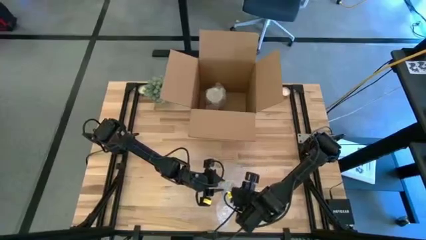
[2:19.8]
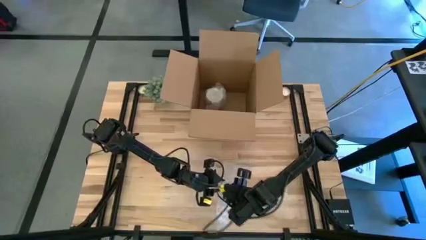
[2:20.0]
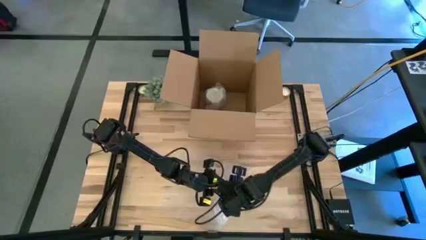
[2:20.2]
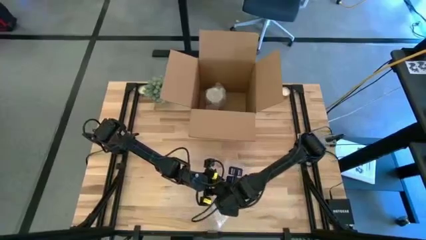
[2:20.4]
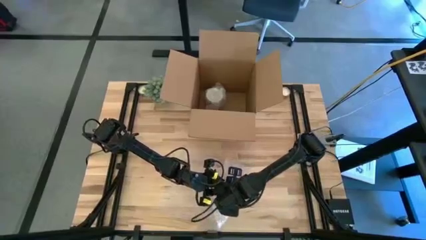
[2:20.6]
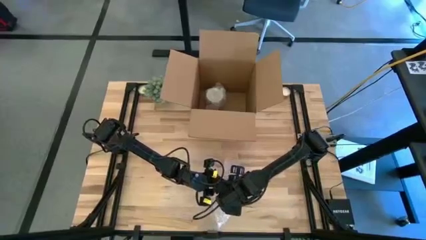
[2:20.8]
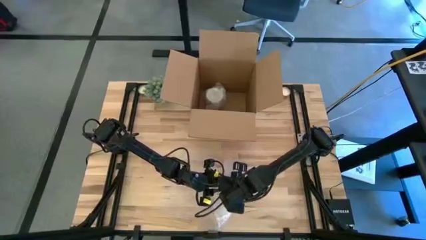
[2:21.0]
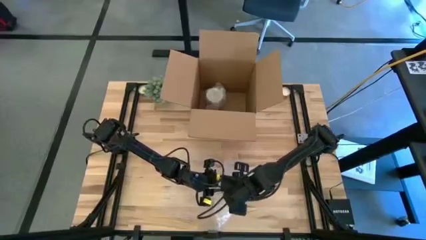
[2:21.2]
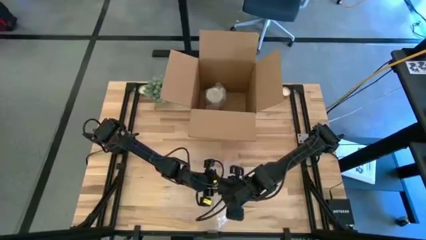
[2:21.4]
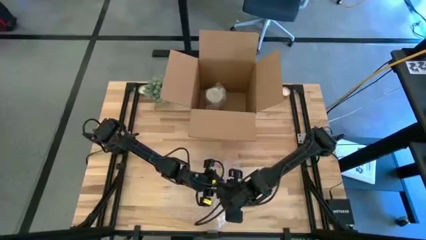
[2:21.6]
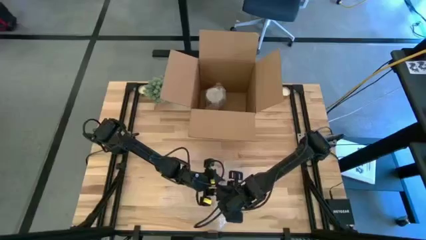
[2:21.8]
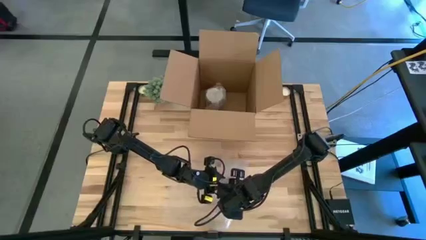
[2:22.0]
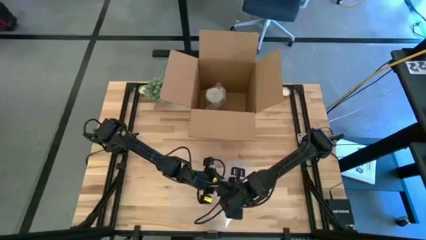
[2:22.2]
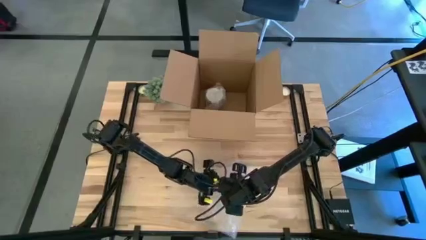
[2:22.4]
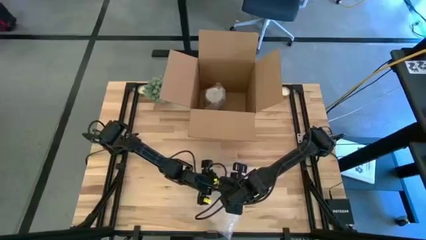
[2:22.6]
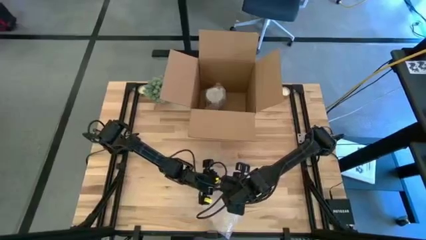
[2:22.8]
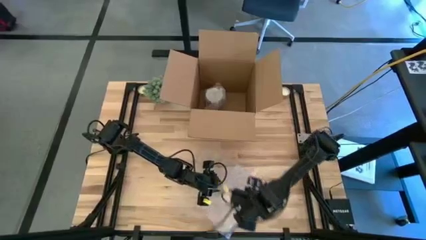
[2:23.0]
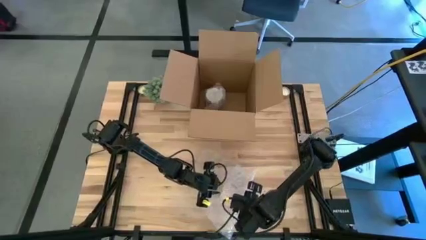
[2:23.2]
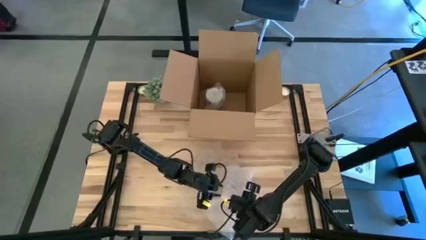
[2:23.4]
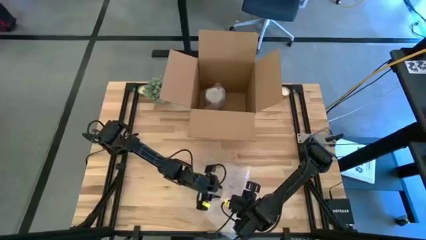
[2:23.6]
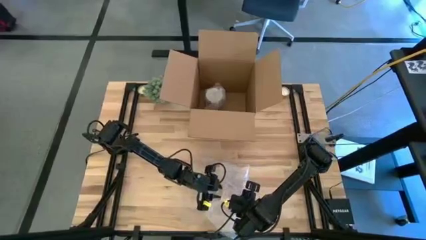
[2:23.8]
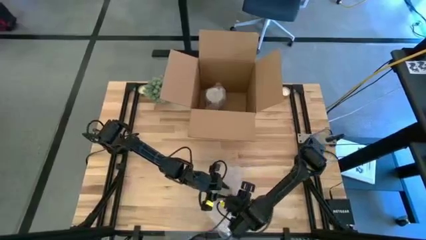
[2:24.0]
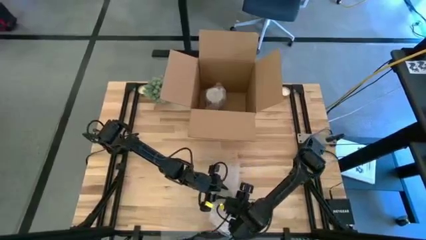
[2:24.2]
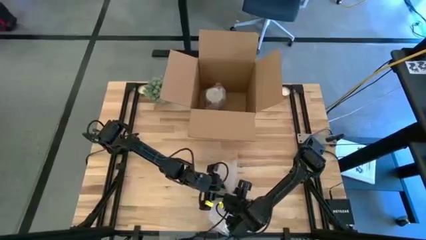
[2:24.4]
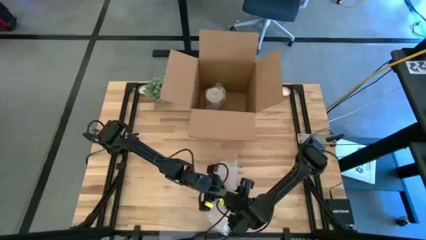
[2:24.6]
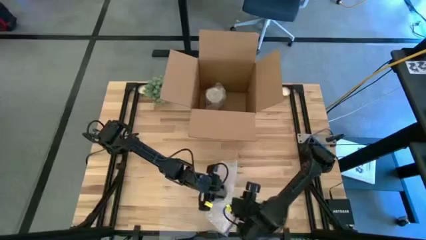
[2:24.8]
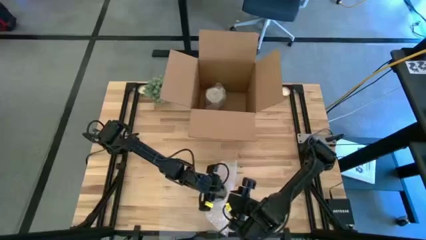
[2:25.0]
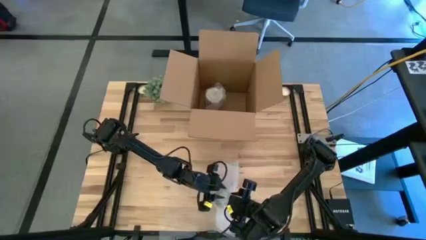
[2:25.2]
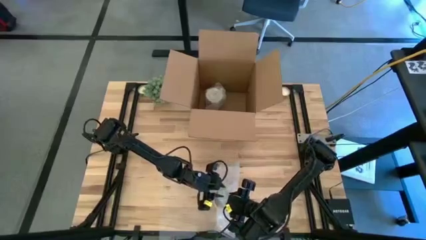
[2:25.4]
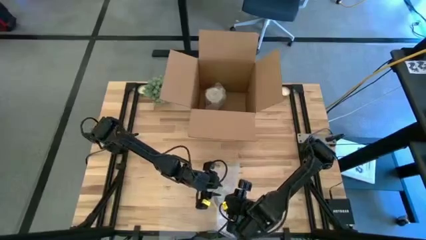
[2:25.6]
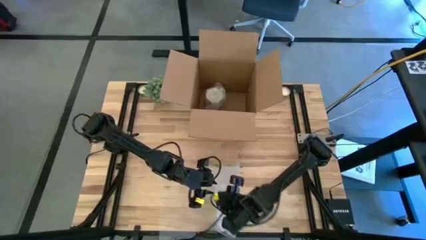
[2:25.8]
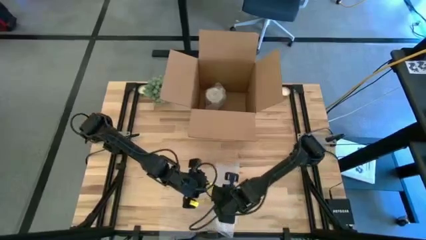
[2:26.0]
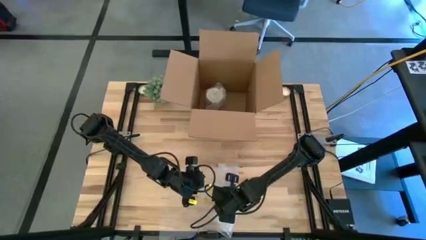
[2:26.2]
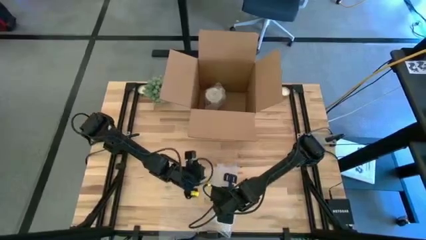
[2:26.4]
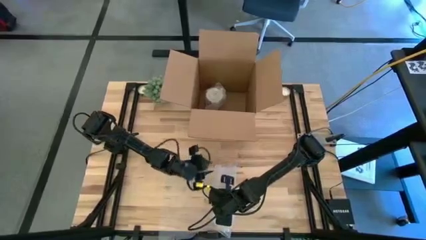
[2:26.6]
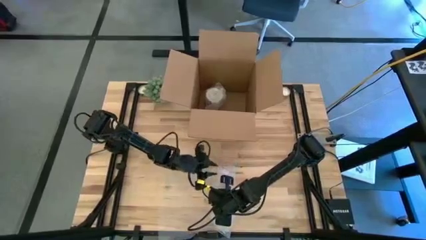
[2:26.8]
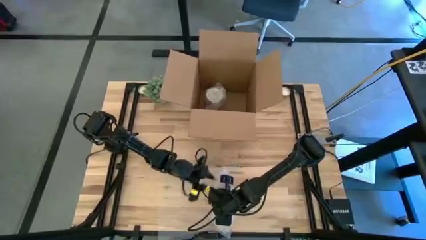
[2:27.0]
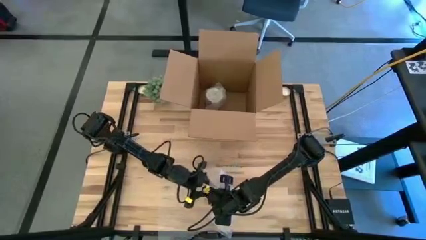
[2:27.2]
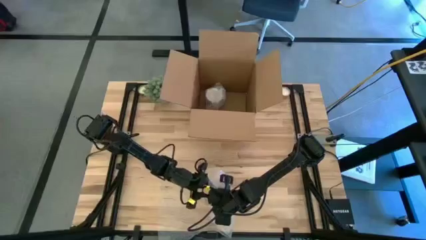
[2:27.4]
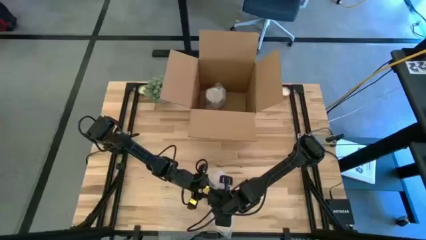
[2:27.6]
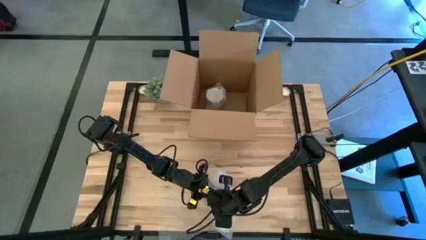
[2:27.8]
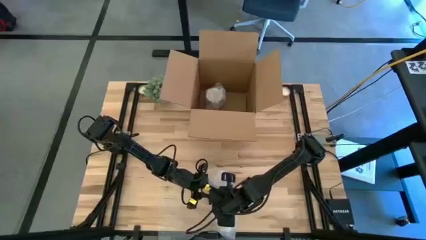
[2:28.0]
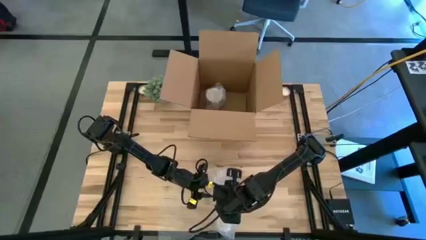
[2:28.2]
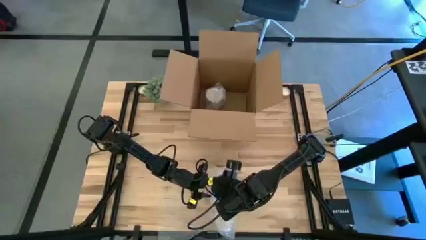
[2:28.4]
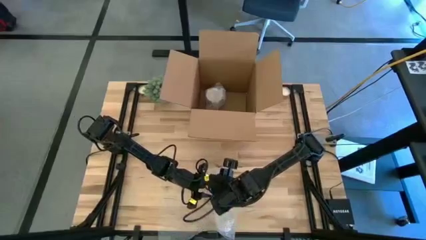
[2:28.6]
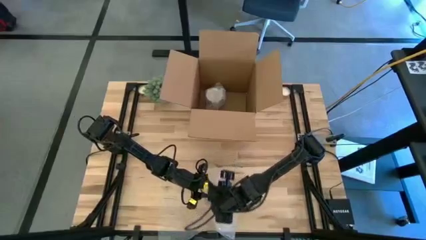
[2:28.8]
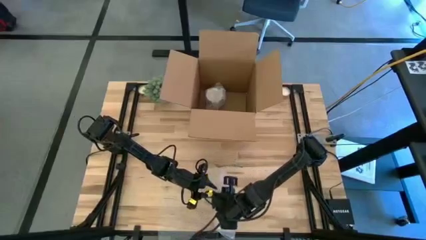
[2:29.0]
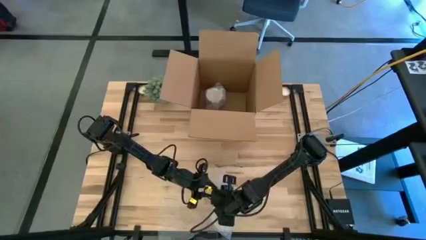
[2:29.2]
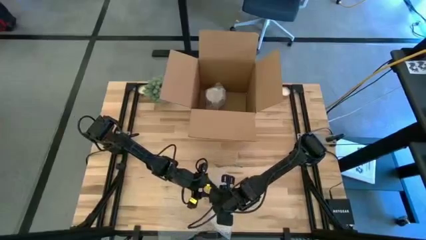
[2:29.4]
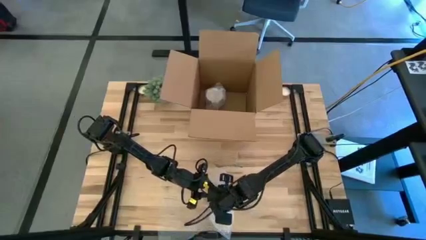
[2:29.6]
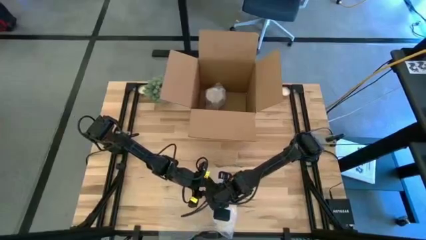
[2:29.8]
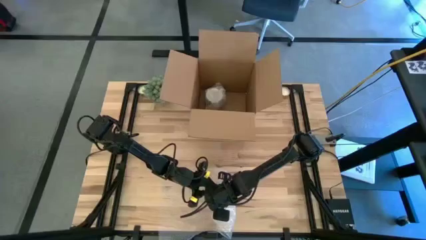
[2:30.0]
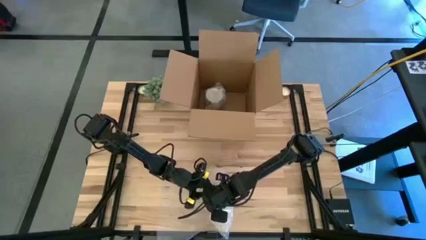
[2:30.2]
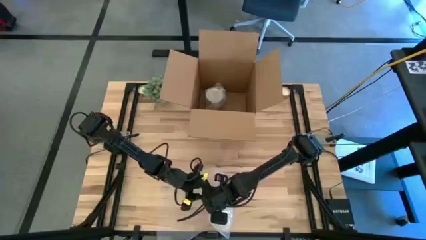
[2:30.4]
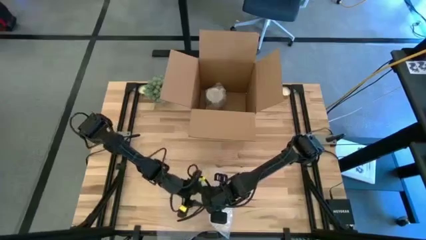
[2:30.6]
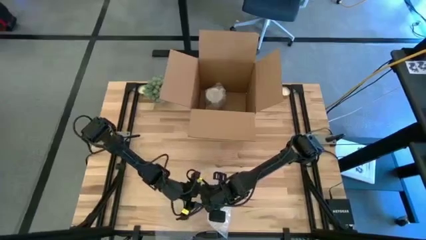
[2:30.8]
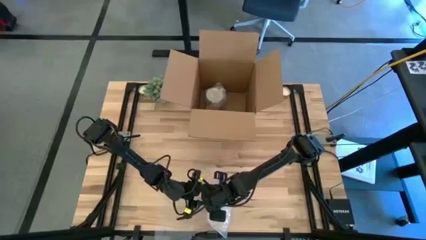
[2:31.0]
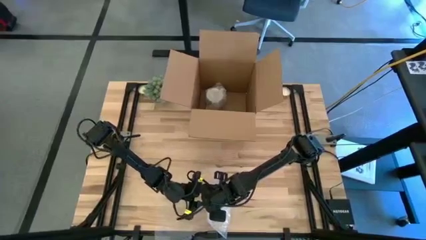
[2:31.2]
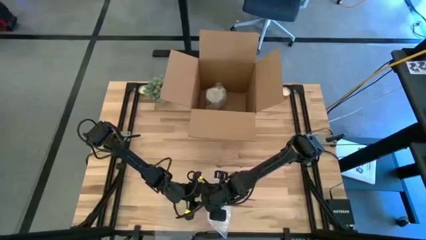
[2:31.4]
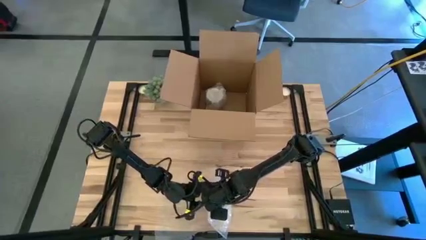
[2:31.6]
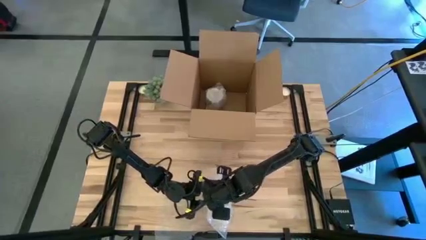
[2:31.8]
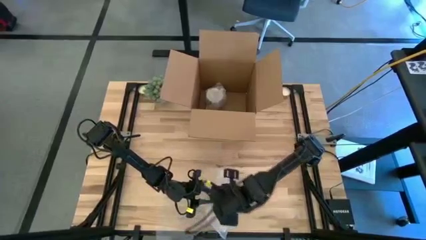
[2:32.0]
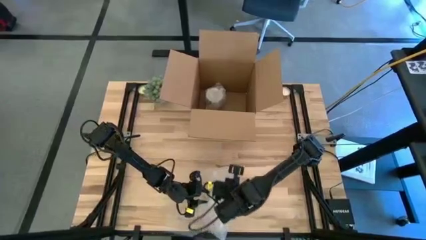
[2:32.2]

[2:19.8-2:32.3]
Task: wrap mug
Wrap the orange mug with bubble wrap

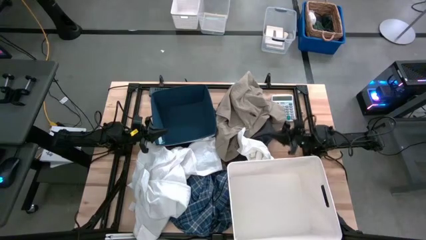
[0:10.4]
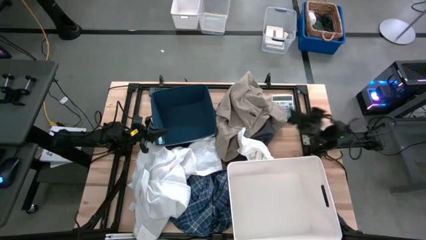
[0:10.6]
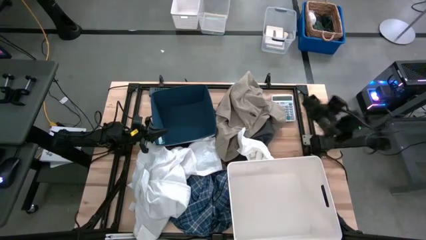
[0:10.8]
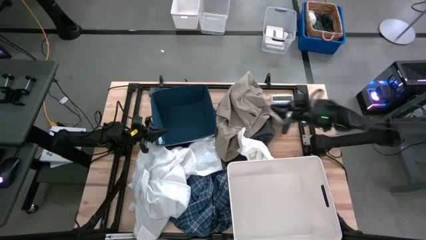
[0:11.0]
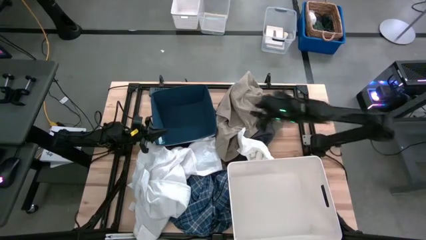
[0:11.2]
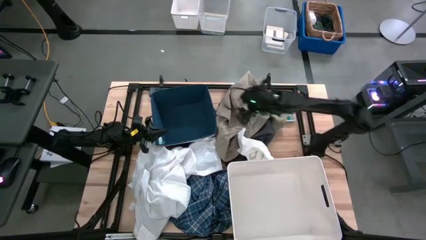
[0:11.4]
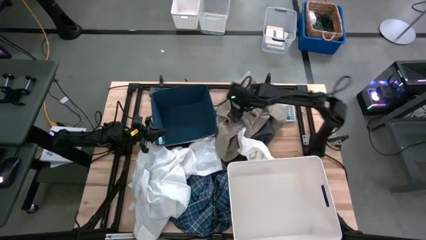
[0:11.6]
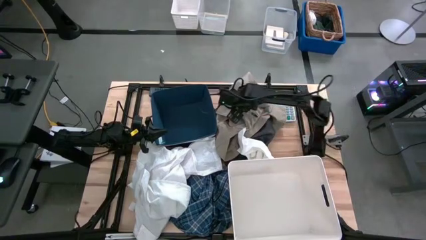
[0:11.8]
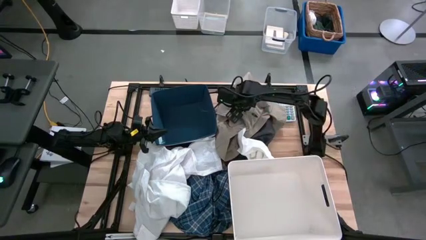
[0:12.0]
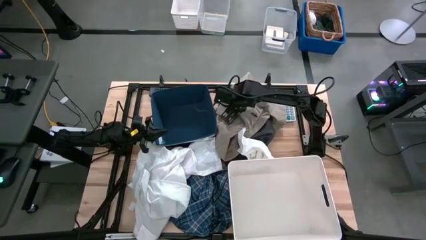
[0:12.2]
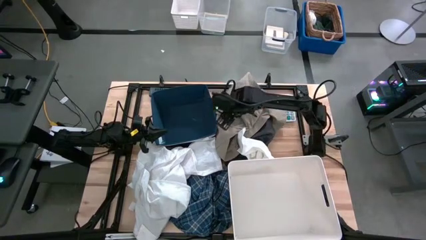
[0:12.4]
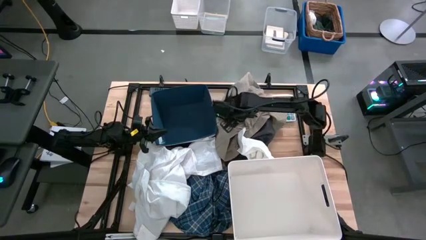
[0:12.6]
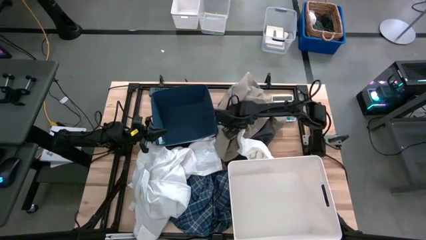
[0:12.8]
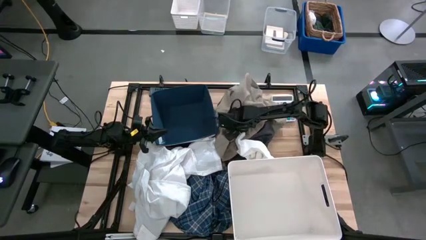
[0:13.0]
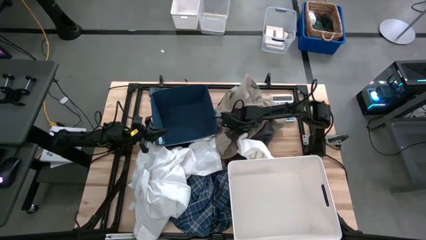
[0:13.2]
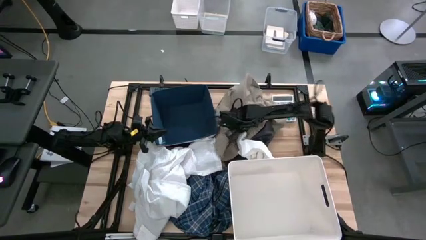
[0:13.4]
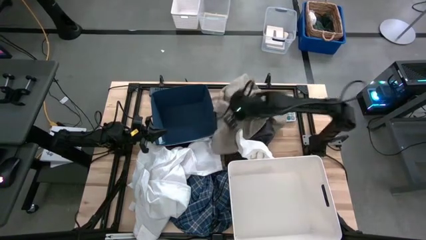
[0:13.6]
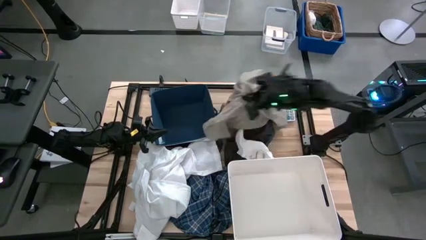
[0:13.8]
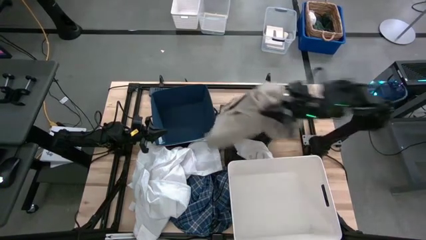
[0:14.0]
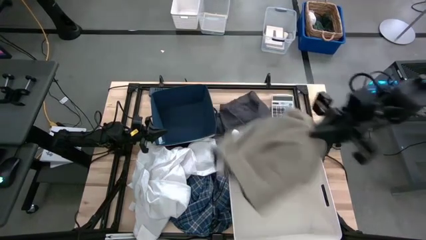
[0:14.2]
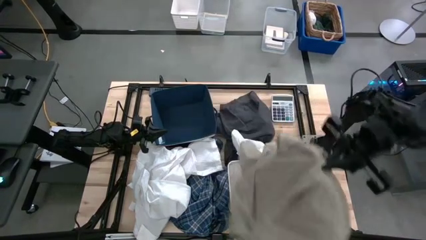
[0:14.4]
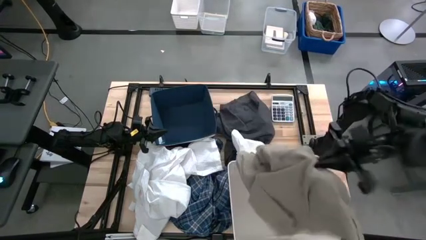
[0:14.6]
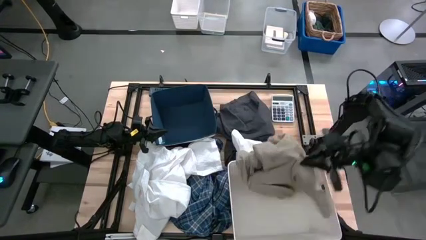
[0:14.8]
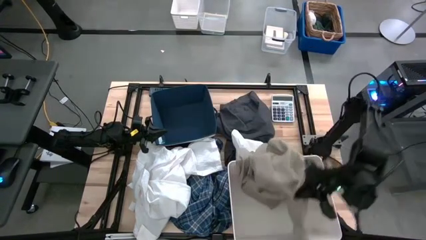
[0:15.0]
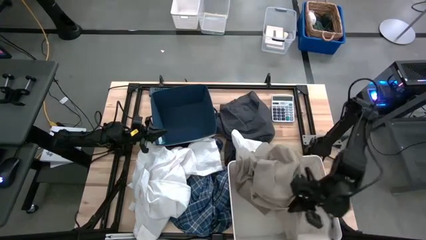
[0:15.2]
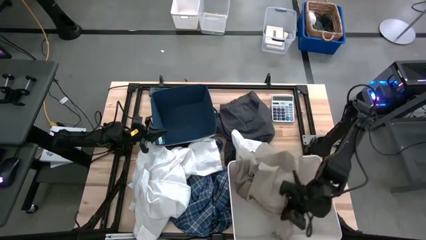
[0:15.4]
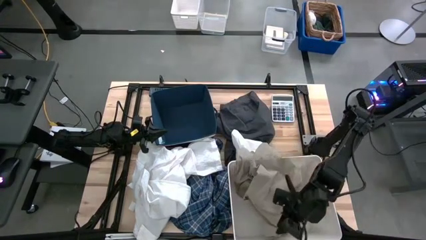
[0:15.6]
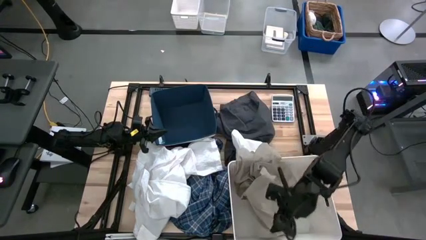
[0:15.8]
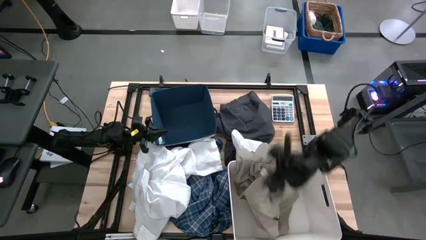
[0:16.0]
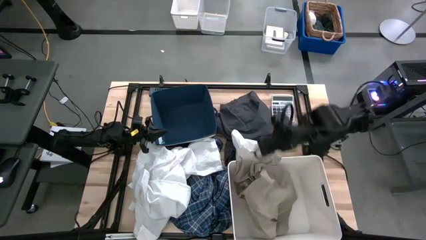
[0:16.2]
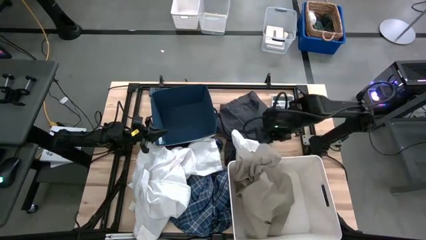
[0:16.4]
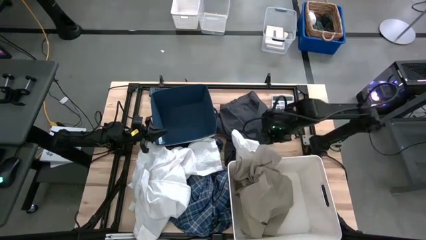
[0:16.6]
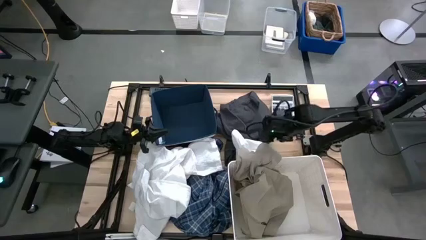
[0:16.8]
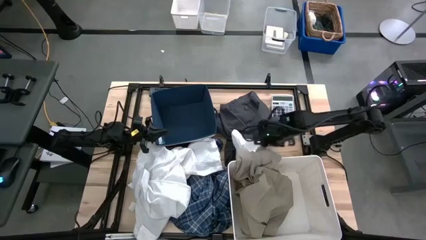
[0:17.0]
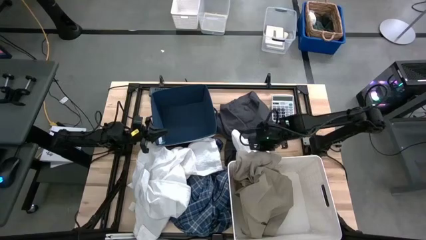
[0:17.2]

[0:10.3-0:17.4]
Task: Sort clothes
Put the brown pants into the white laundry bin
